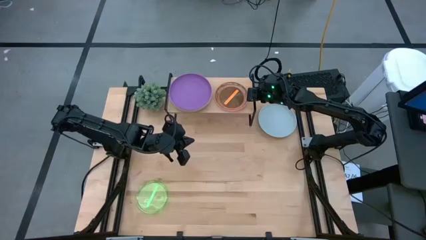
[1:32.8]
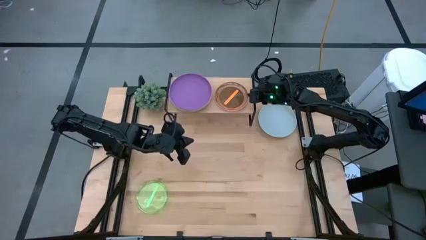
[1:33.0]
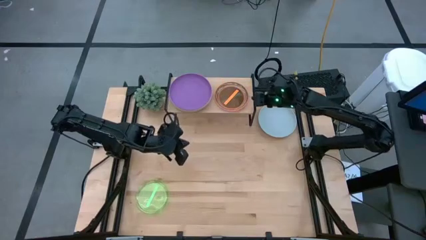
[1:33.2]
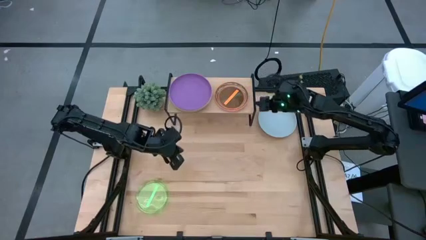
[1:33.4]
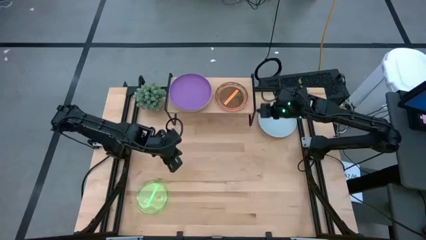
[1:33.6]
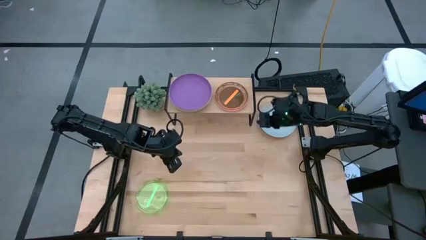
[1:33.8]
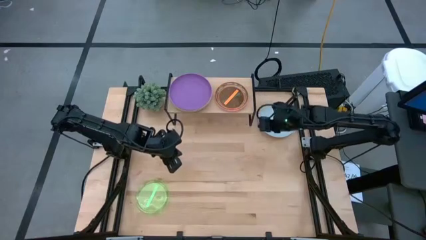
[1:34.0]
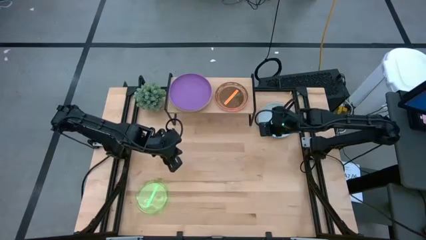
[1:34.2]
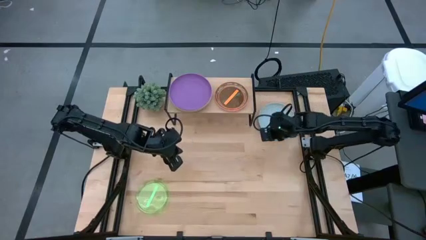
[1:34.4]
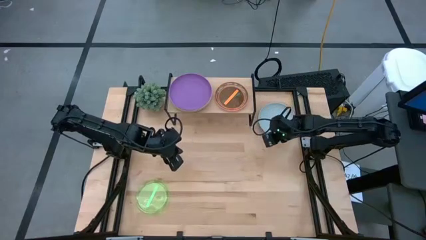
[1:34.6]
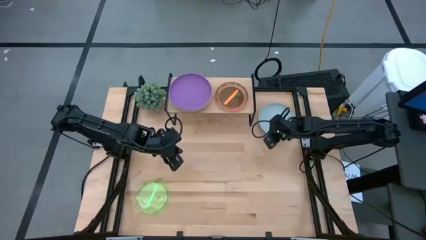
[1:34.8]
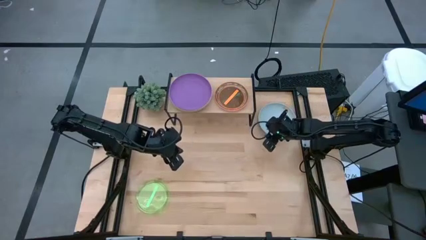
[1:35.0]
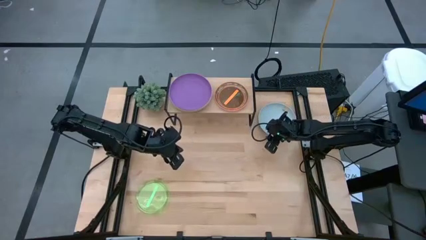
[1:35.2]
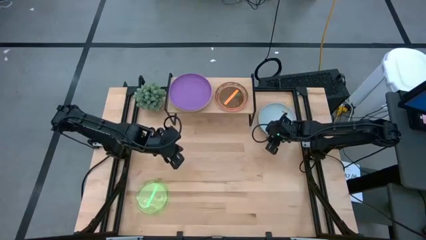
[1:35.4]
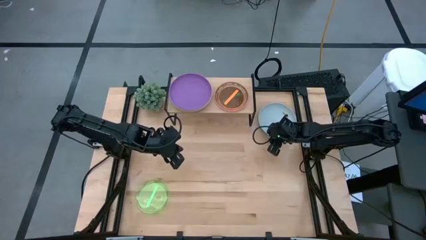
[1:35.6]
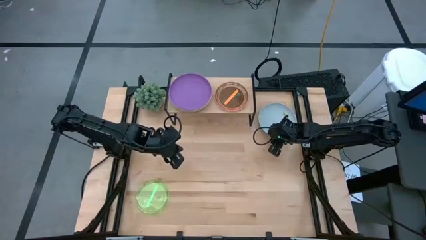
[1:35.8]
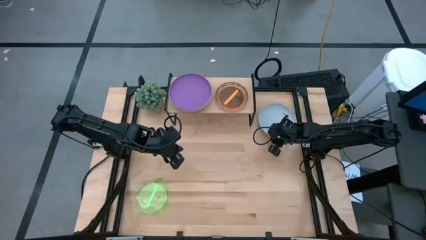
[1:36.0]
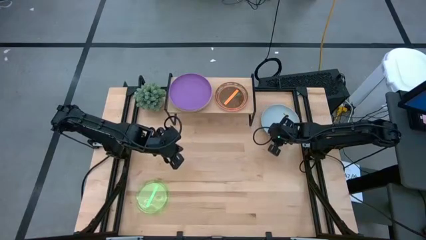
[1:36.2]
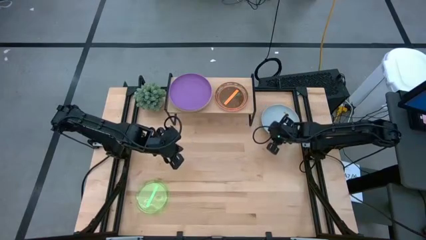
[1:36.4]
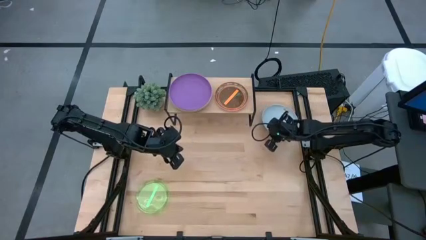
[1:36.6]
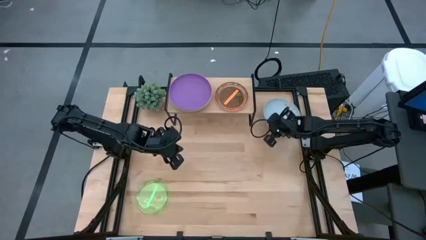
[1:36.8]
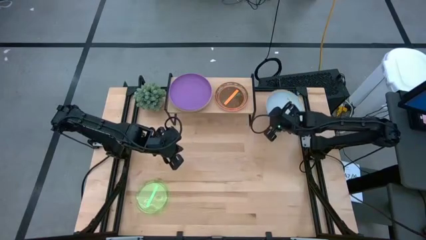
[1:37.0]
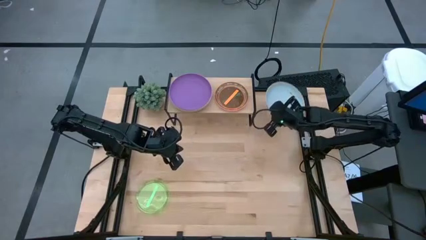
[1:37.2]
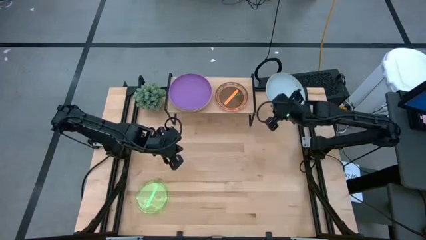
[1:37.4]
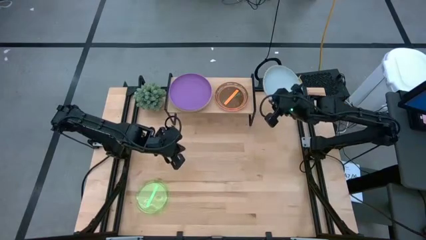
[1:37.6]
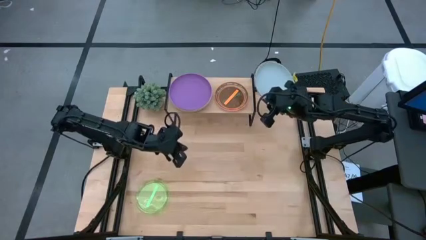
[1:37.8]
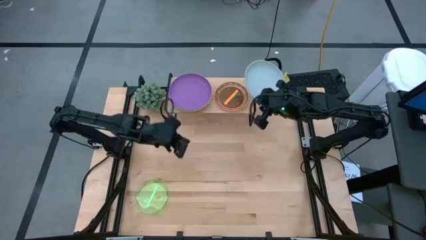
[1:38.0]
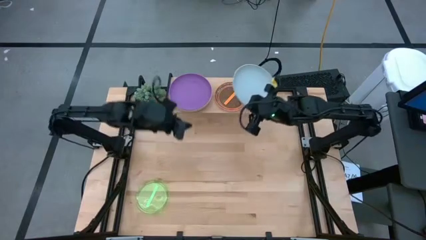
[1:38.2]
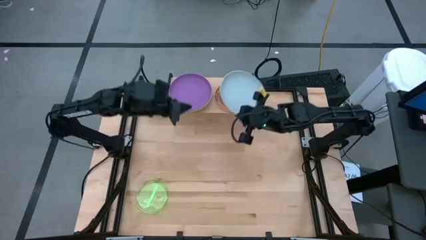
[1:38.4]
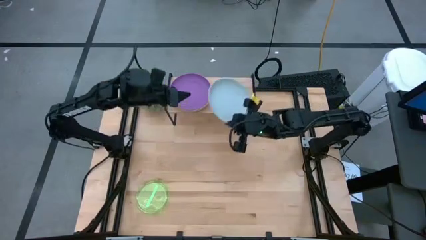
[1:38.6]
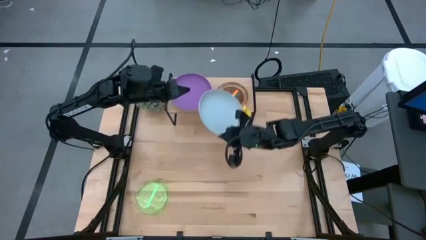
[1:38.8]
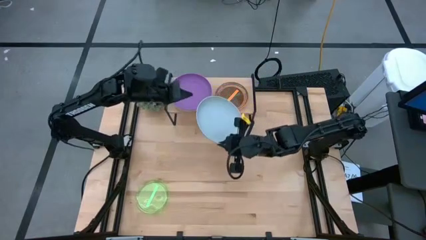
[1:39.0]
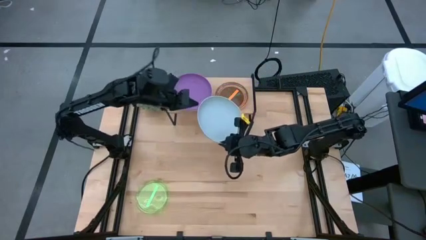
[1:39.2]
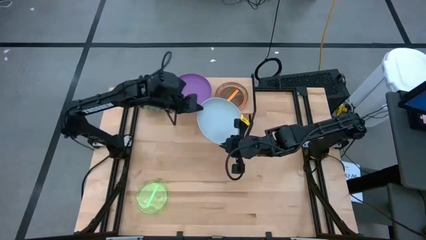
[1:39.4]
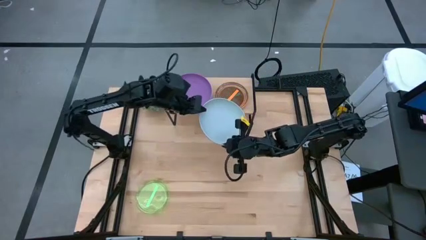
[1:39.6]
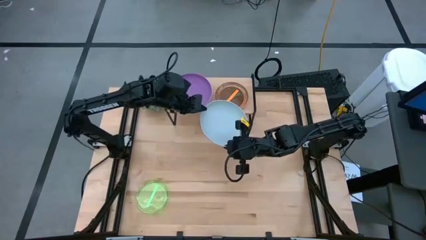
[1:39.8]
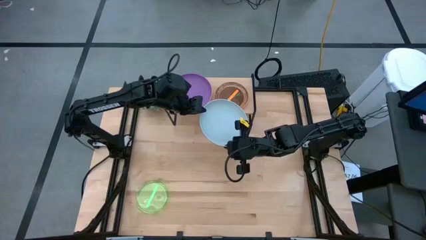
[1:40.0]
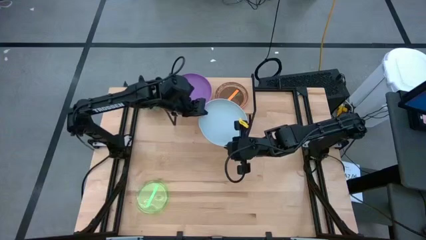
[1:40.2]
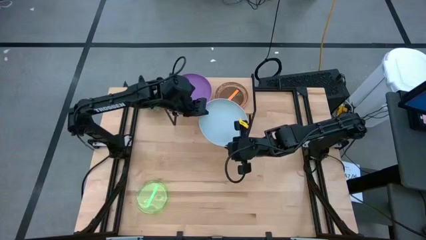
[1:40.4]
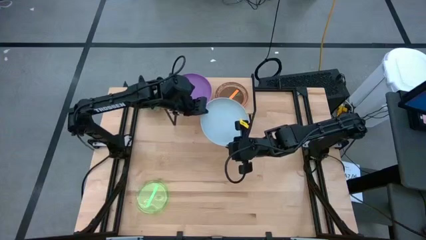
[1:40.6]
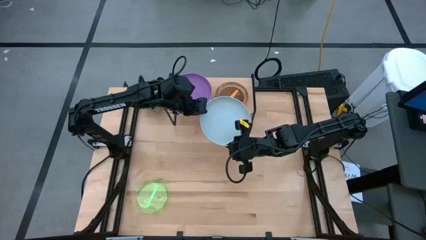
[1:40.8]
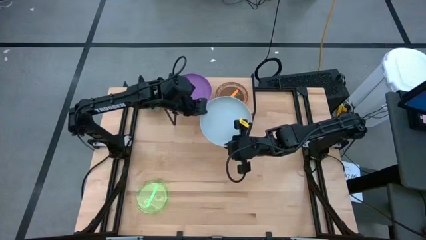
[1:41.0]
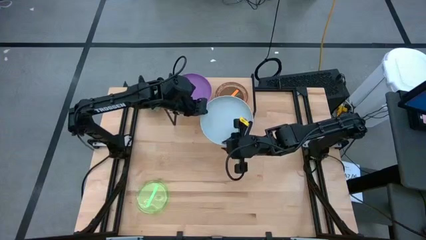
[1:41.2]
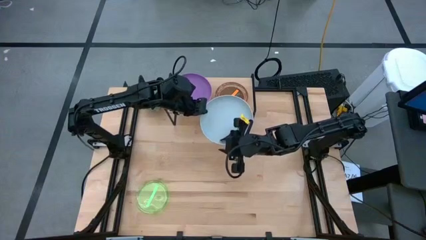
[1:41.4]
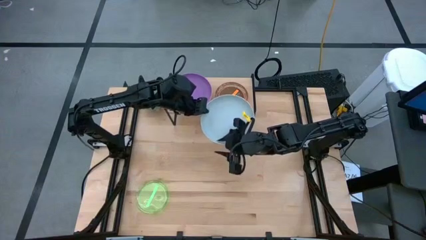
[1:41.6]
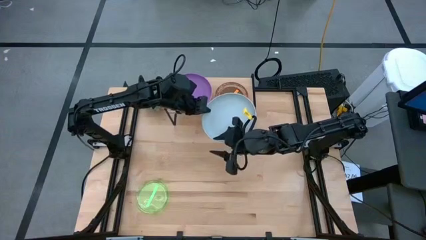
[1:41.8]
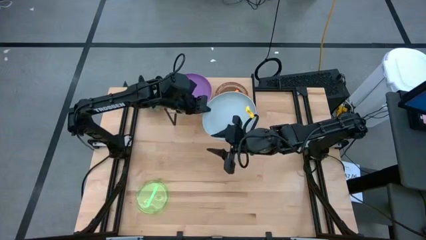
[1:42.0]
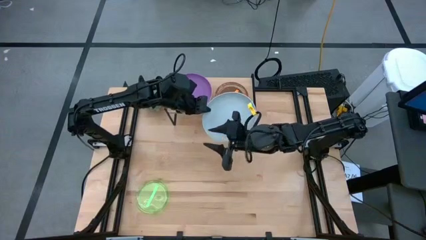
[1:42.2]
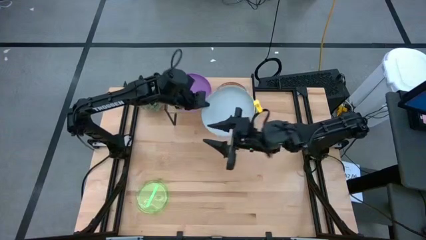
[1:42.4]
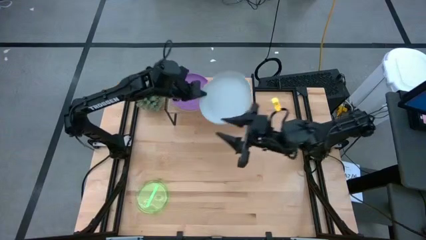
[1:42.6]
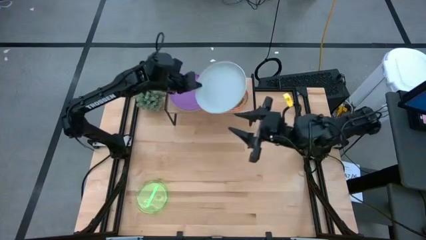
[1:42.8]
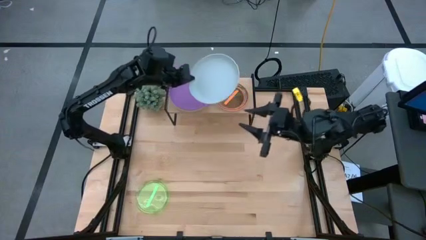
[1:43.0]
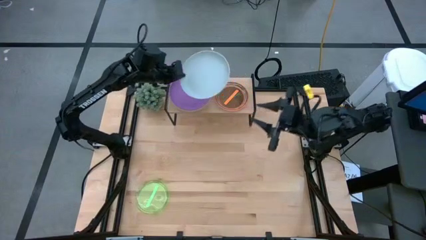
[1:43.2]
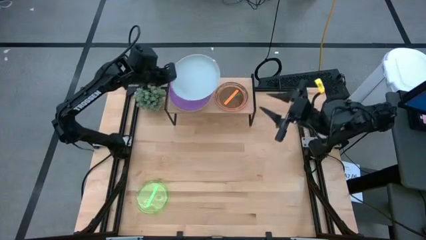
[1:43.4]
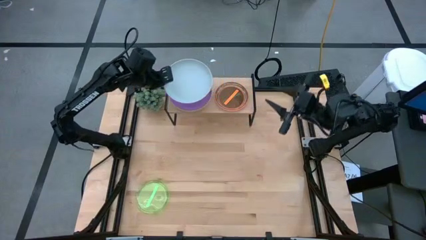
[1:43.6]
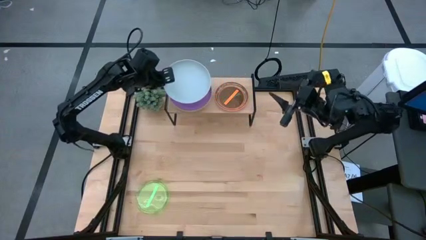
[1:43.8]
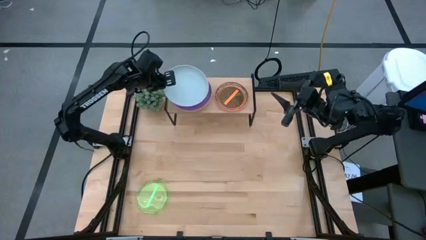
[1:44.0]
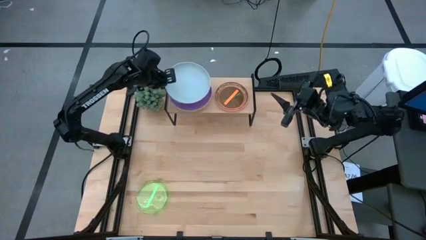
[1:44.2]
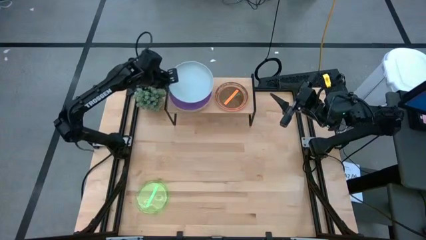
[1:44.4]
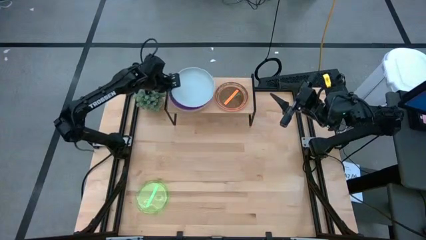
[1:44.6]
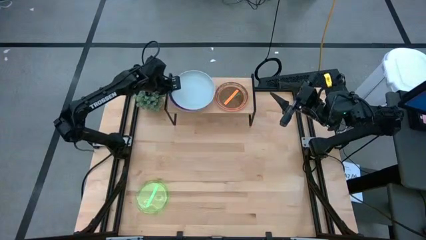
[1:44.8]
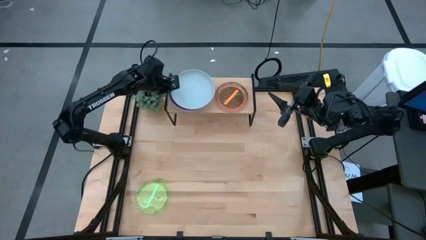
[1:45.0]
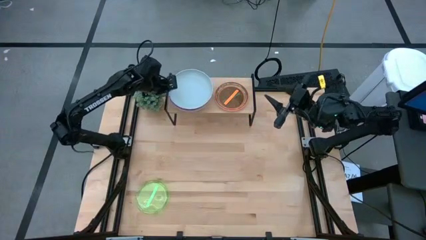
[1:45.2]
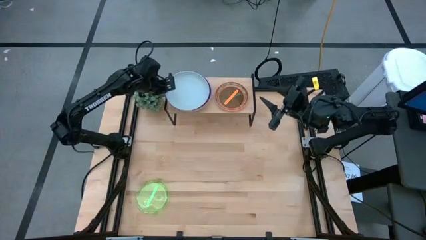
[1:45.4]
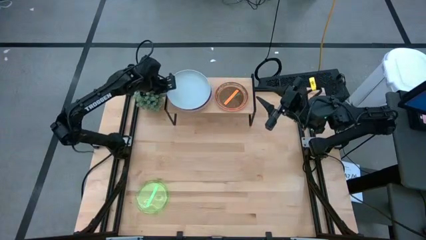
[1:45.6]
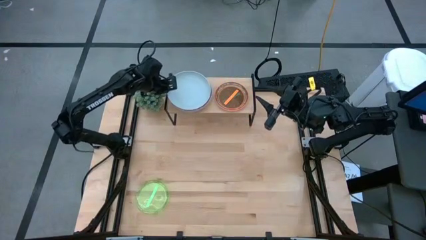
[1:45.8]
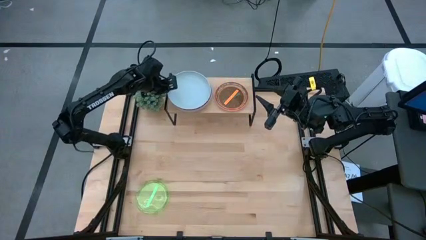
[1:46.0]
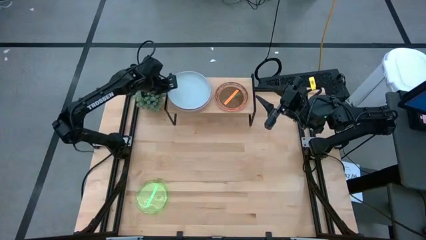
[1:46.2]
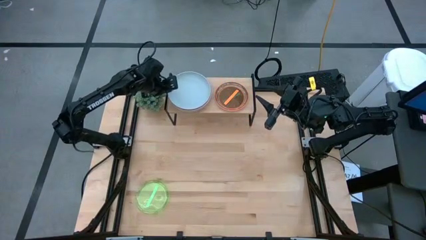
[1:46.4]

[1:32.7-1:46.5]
Task: Place and stack plates onto a shelf
Stack the blue plate on top of the purple plate on the shelf

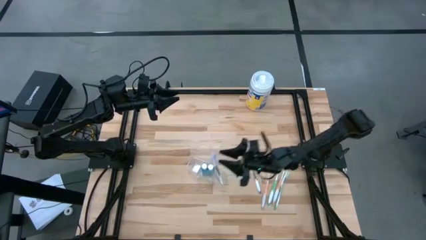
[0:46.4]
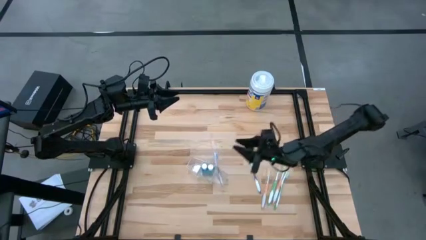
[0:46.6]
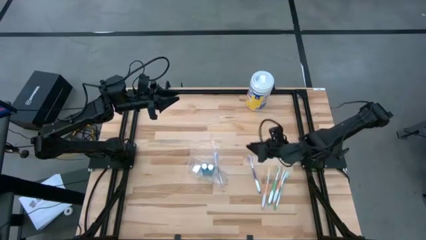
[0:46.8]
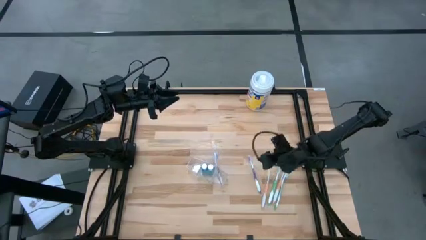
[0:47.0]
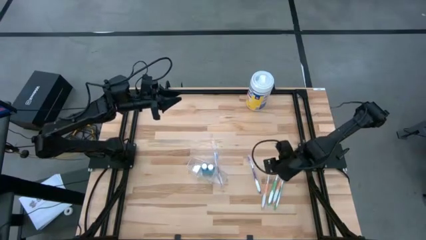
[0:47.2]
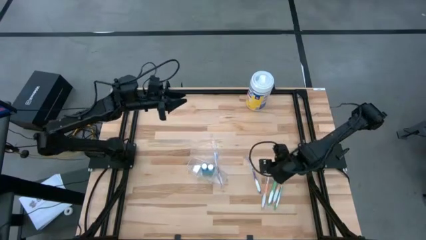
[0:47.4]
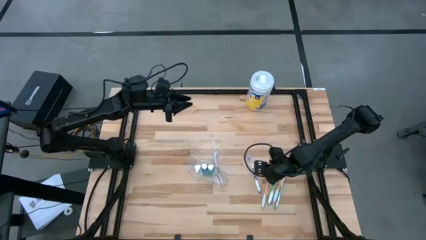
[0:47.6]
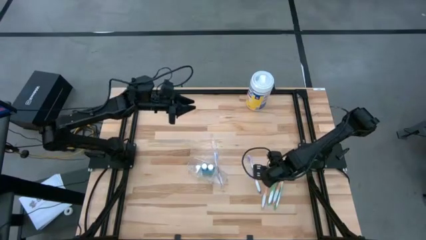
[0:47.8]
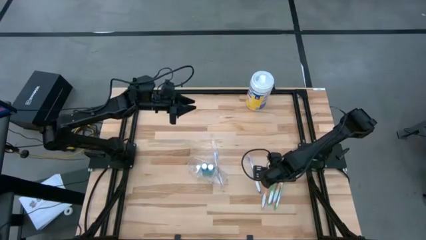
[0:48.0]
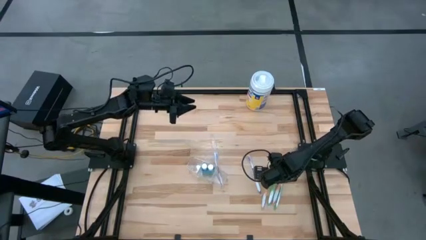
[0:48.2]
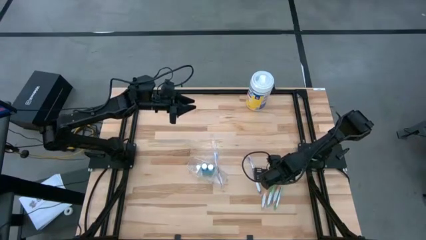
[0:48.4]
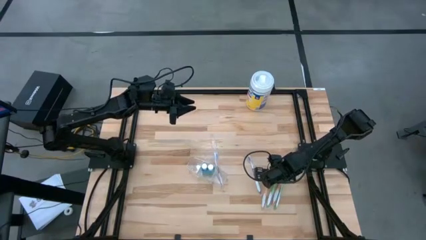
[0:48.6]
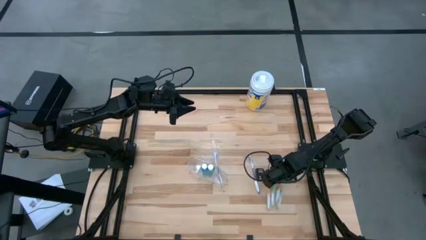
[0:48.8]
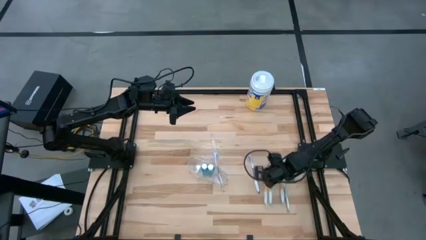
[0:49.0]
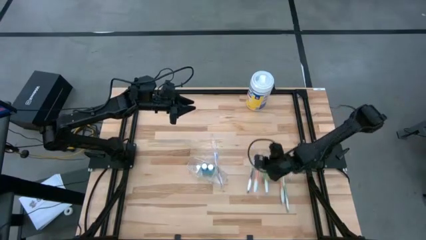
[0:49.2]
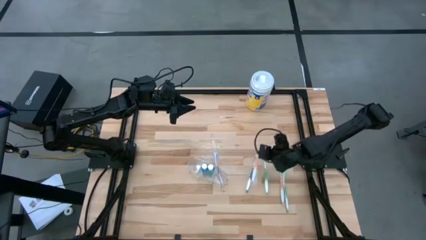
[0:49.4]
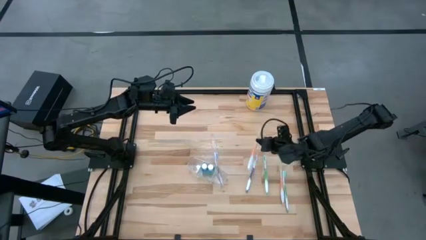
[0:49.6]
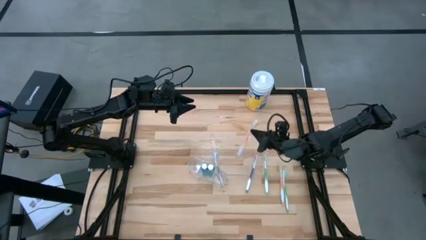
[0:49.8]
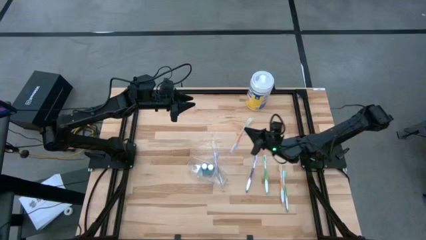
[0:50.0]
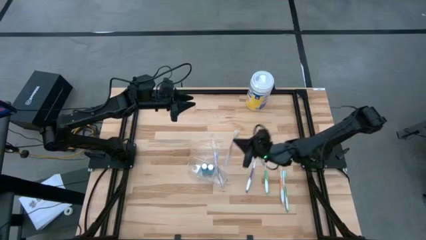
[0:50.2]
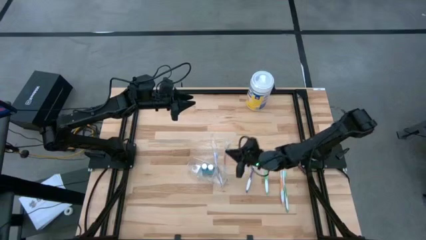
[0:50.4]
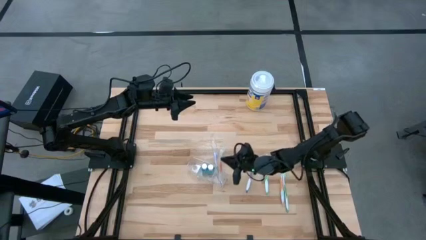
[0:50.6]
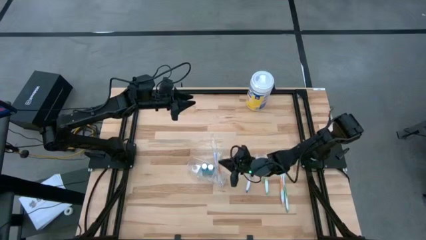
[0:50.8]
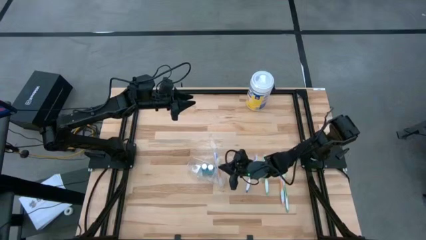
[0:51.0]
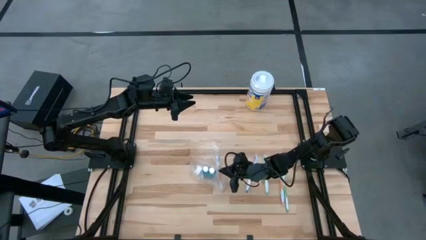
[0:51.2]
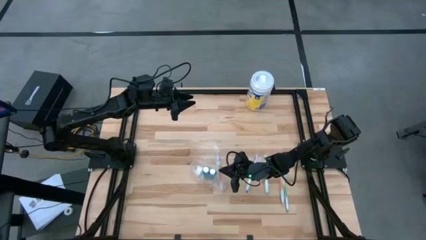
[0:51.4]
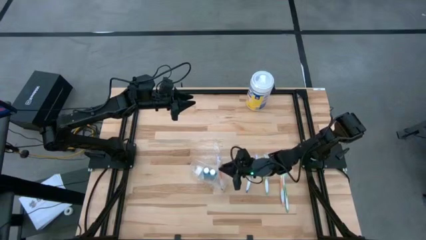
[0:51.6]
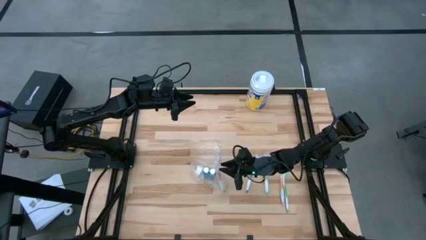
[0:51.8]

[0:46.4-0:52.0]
Task: Pick & Place toothbrushing station
Put the left orange toothbrush into the transparent organizer
